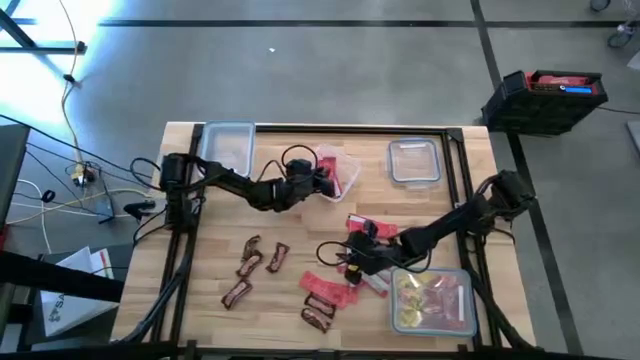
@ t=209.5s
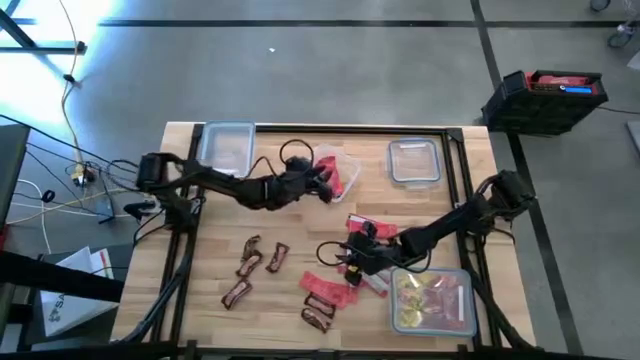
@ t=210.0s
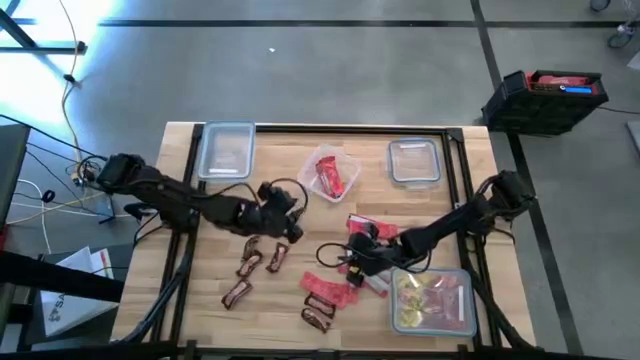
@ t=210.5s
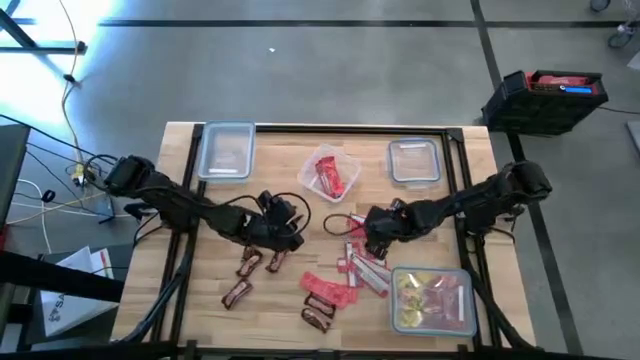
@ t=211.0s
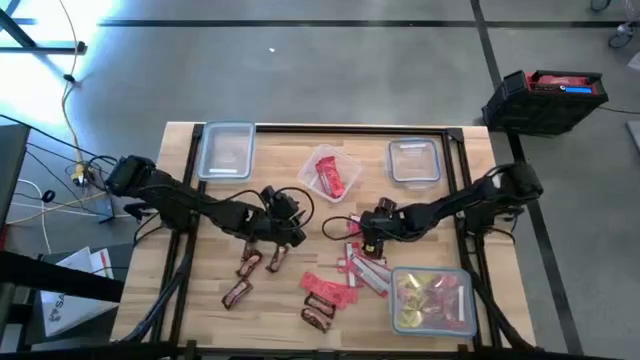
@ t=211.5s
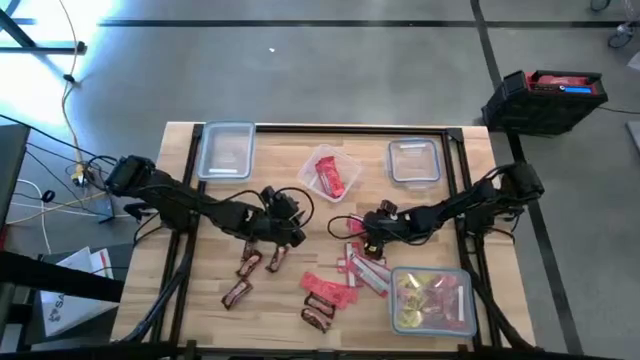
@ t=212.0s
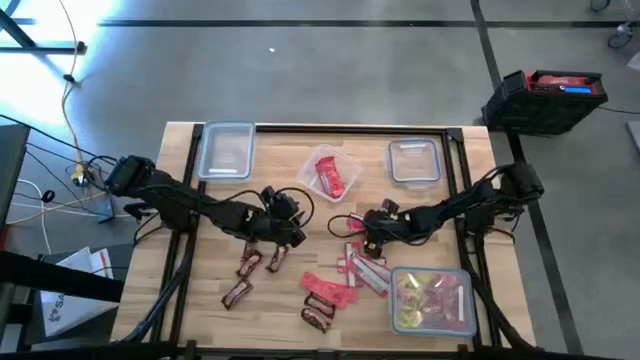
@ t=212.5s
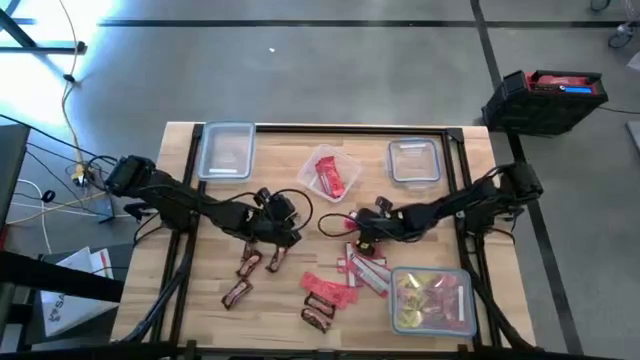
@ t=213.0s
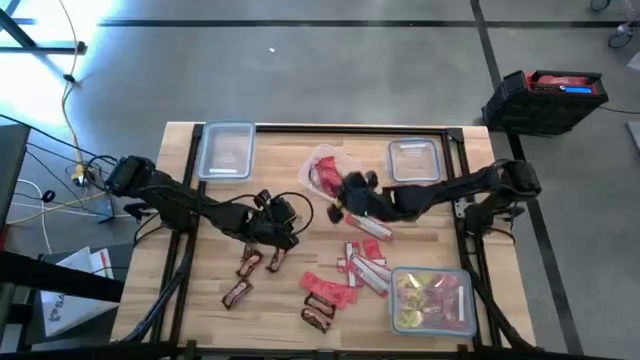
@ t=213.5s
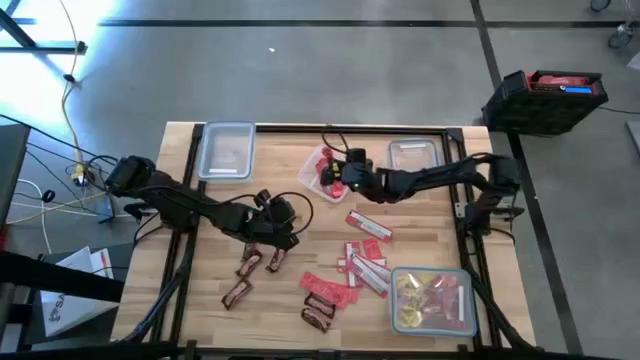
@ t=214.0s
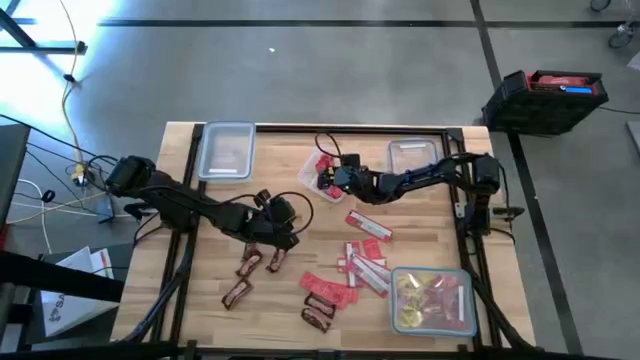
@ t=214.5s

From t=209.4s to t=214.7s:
Task: Sort candy
Put the strawberry red into the upper middle transparent bin

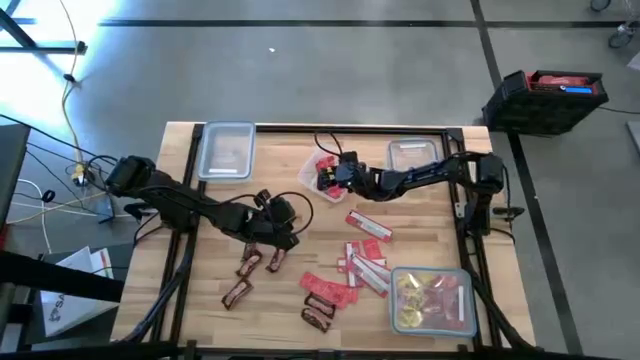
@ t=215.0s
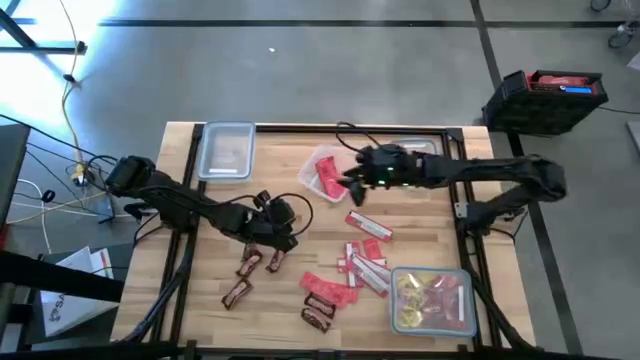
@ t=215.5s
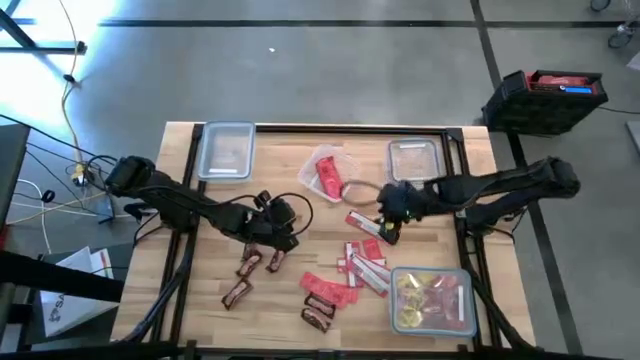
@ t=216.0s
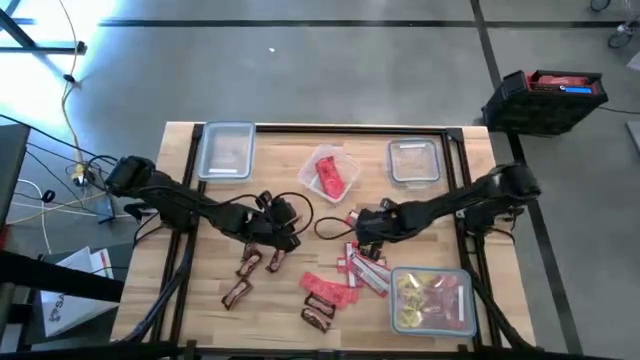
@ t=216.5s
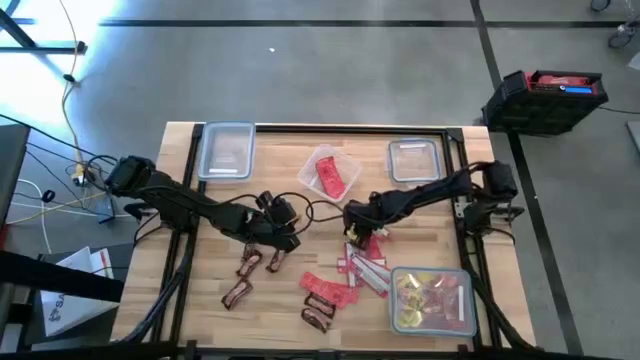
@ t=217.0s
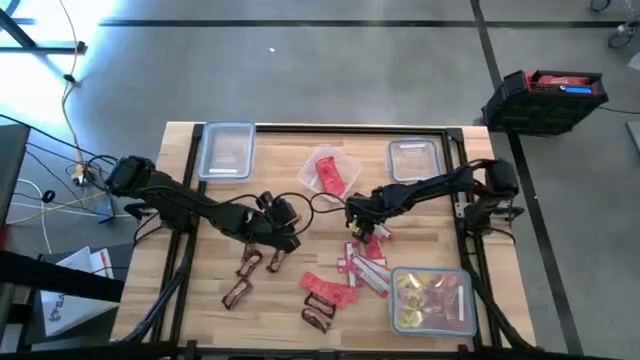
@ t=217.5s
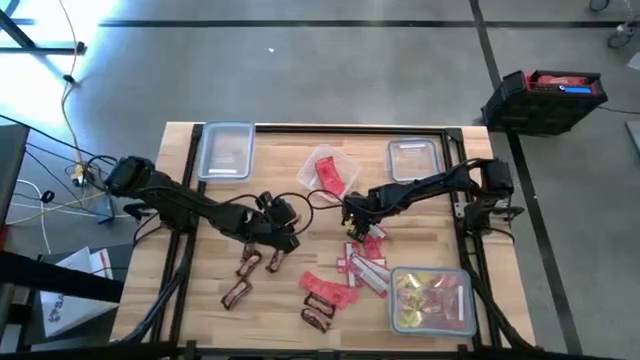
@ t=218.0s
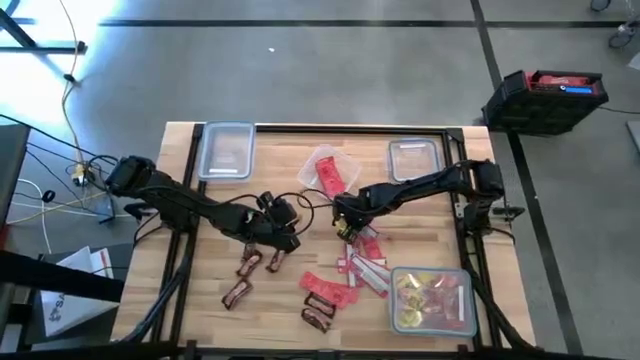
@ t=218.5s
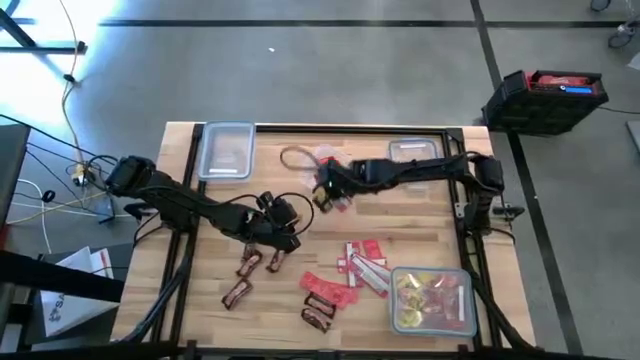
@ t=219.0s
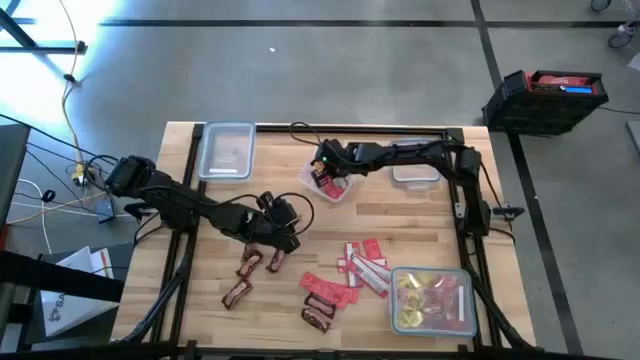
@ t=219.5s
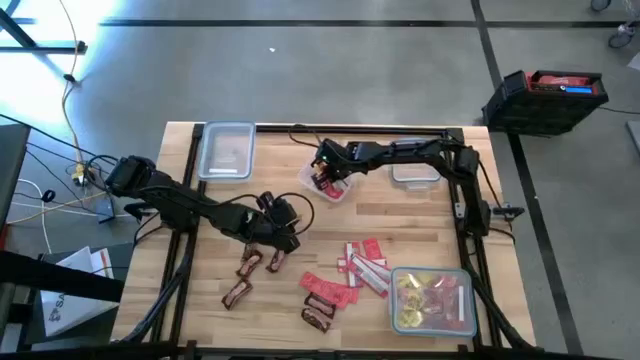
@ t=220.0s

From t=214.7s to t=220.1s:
Put the strawberry red into the upper middle transparent bin

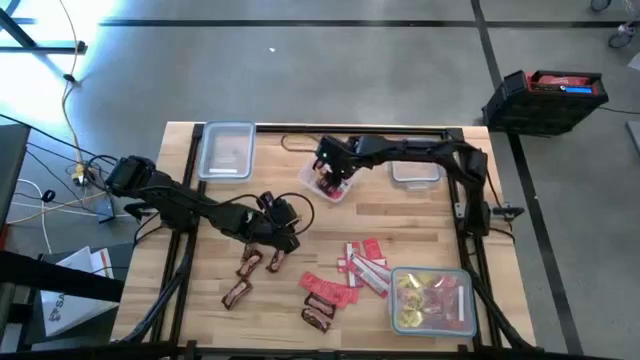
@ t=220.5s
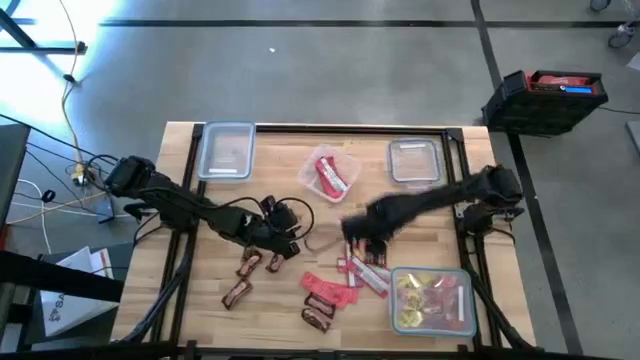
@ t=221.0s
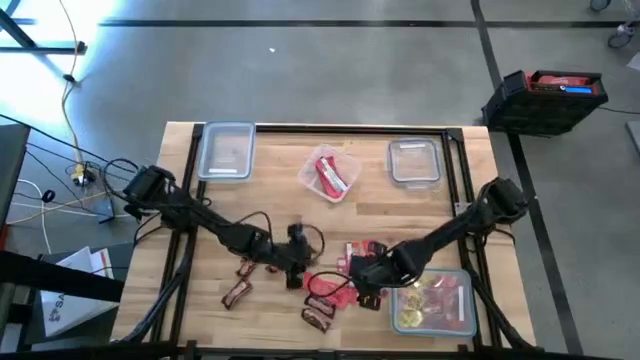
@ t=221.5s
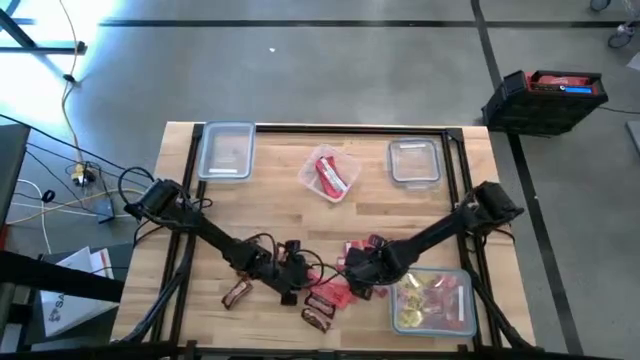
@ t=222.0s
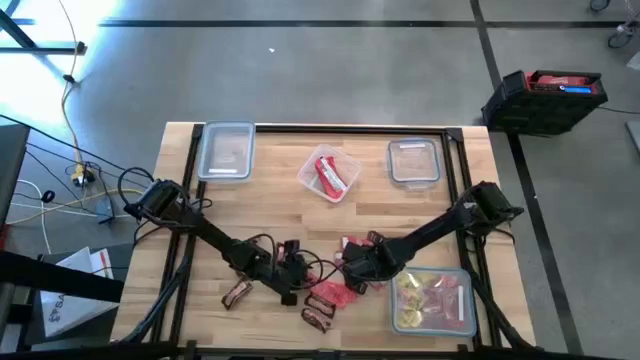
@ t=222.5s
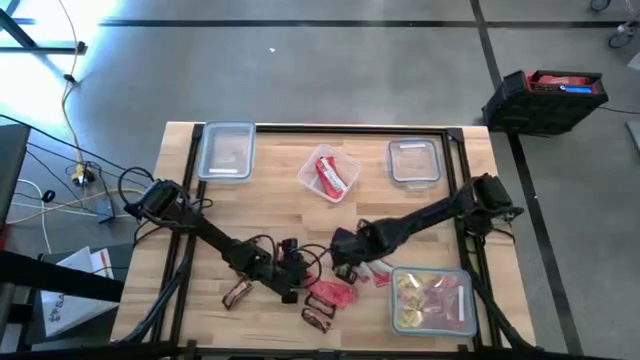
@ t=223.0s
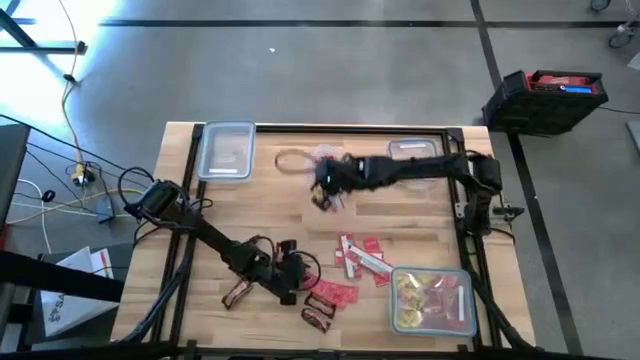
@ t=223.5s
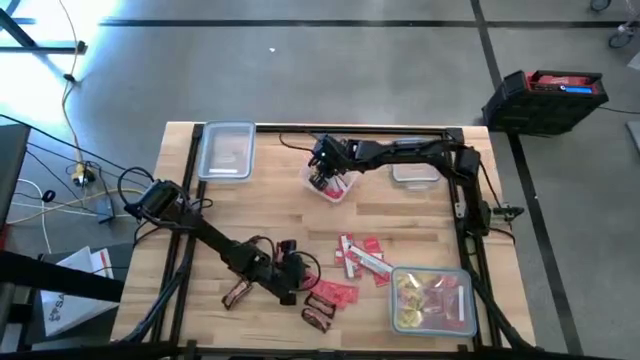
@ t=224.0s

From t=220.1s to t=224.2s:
Put the strawberry red into the upper middle transparent bin

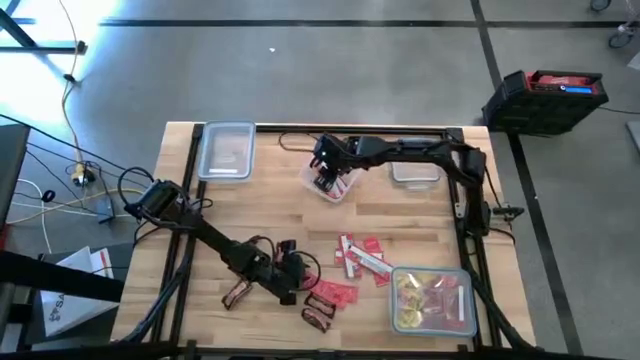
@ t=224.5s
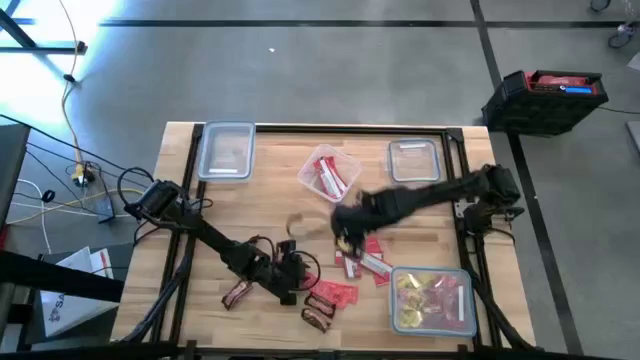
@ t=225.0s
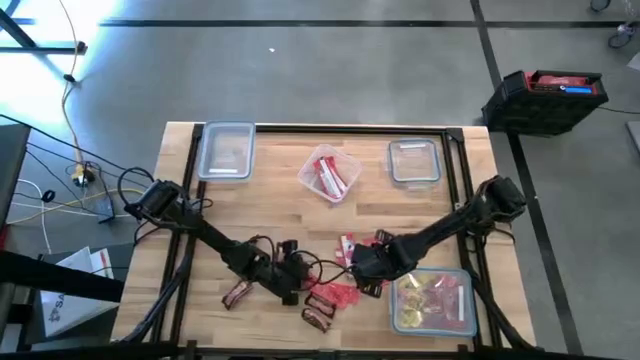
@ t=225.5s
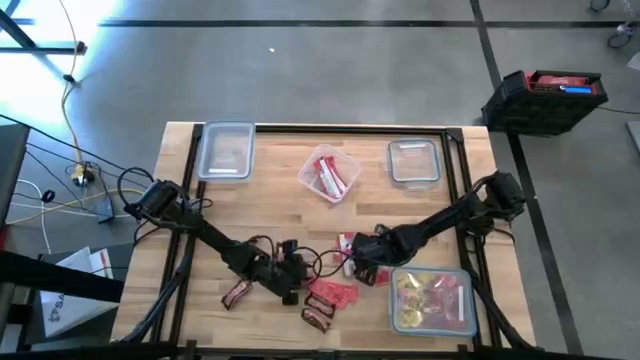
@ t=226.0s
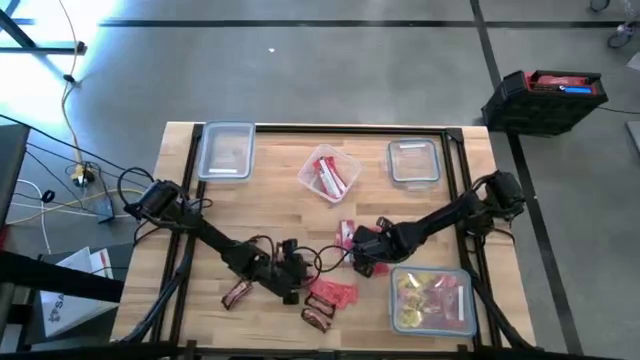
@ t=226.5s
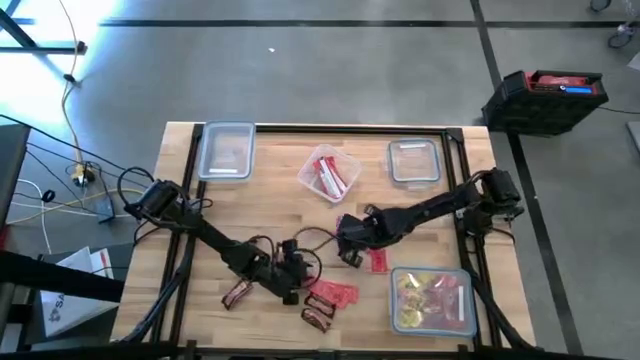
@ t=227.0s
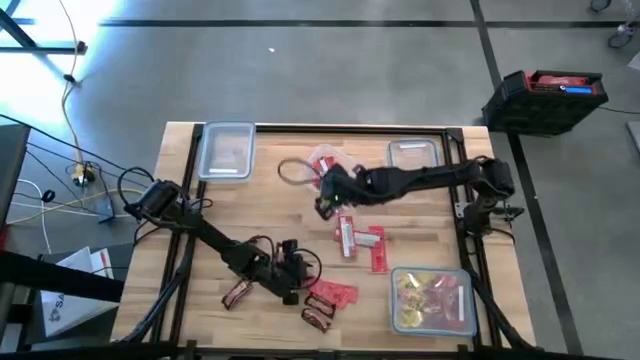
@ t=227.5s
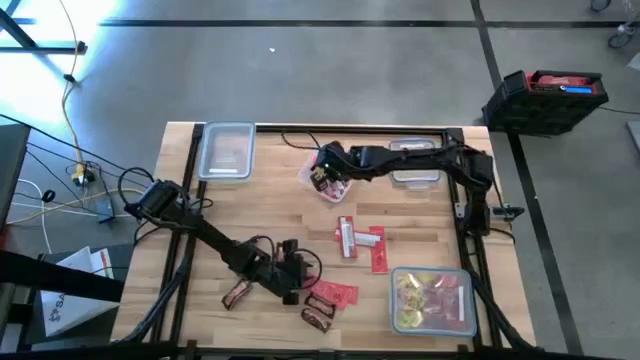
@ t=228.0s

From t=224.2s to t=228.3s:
Put the strawberry red into the upper middle transparent bin

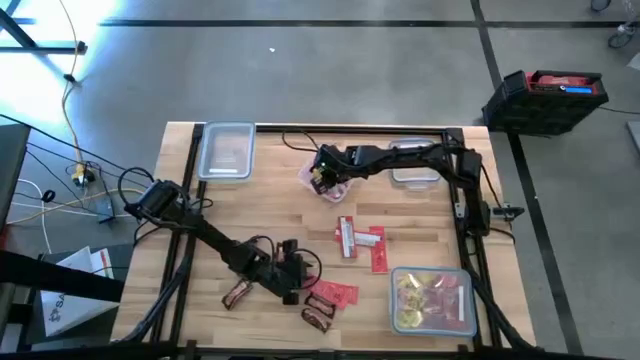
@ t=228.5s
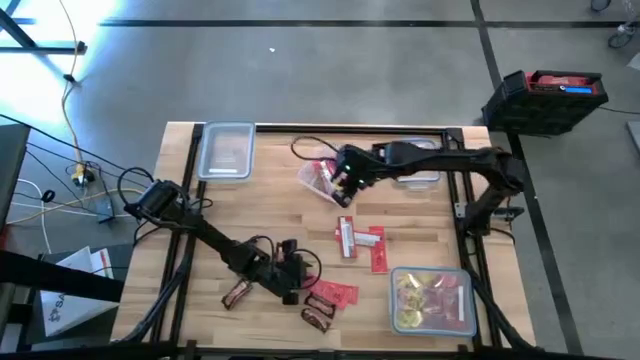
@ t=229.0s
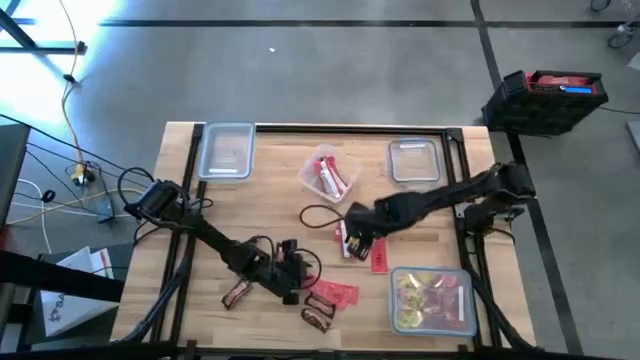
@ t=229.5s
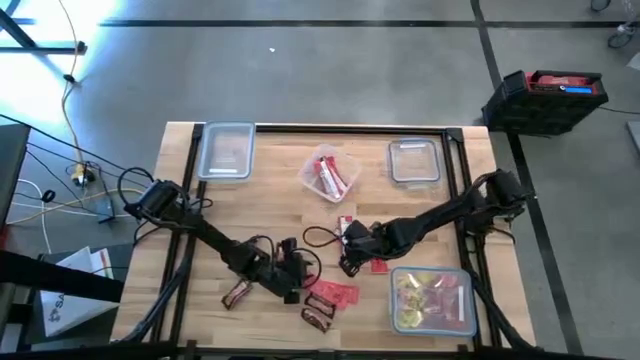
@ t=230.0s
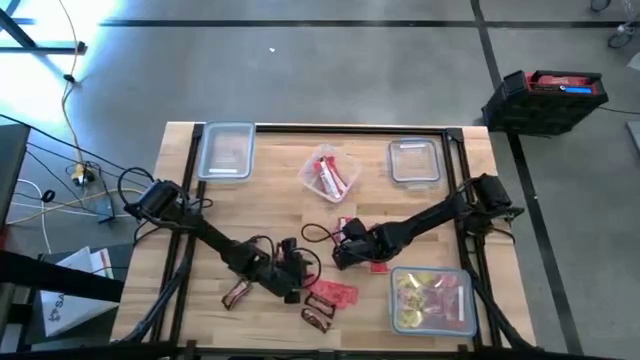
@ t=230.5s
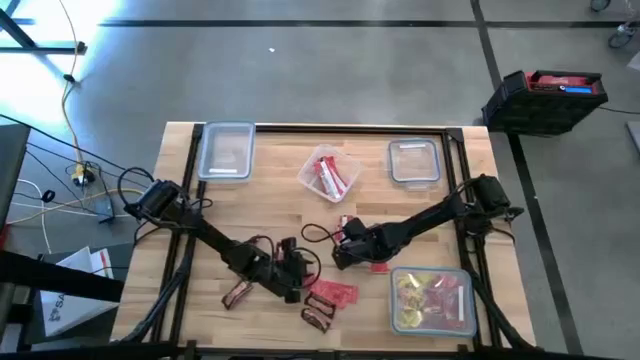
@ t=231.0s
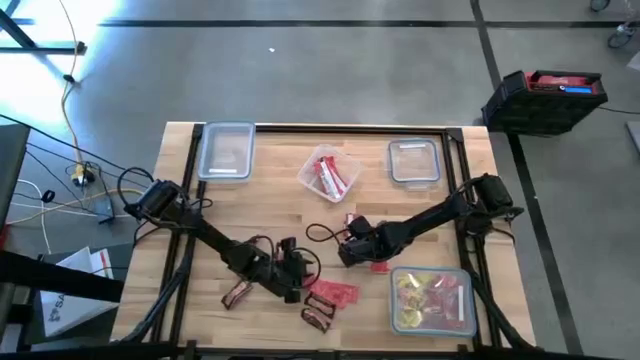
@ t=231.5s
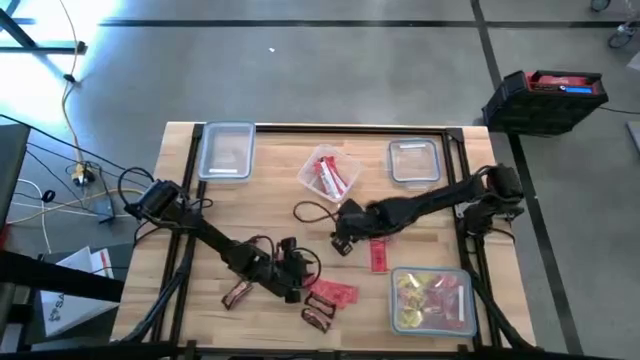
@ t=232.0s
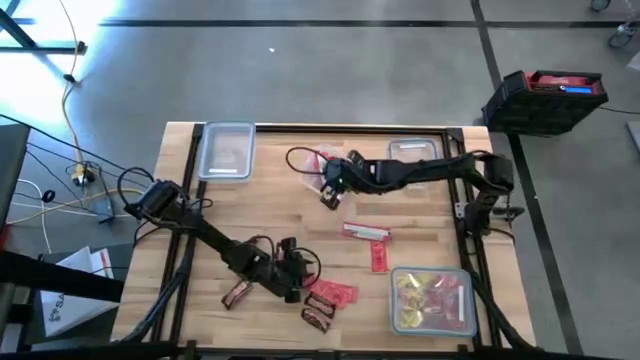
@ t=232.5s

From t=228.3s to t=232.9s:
Put the strawberry red into the upper middle transparent bin
